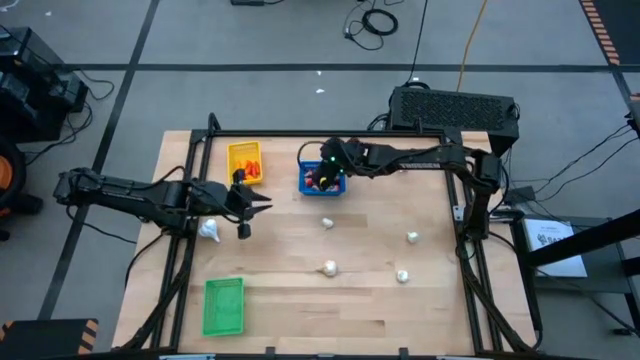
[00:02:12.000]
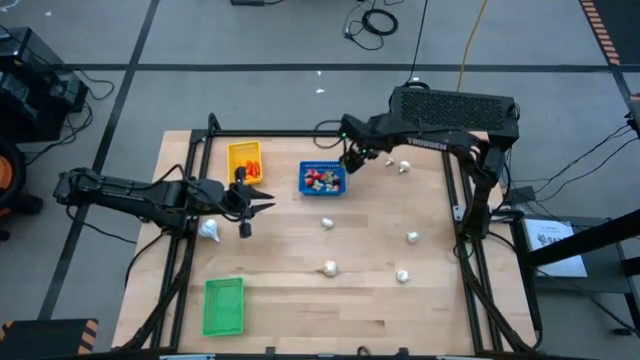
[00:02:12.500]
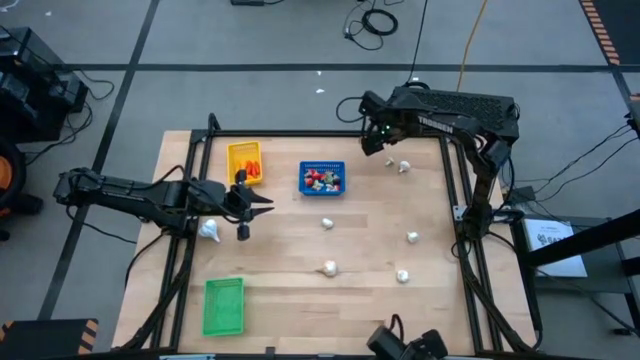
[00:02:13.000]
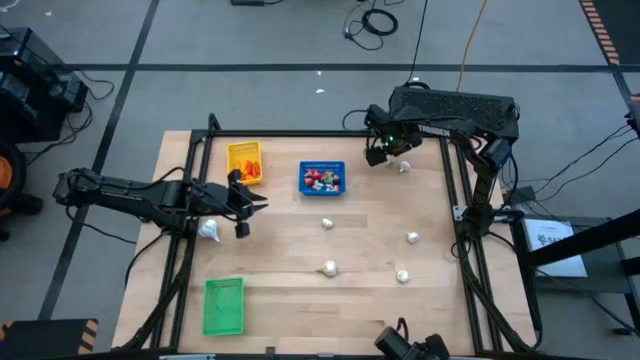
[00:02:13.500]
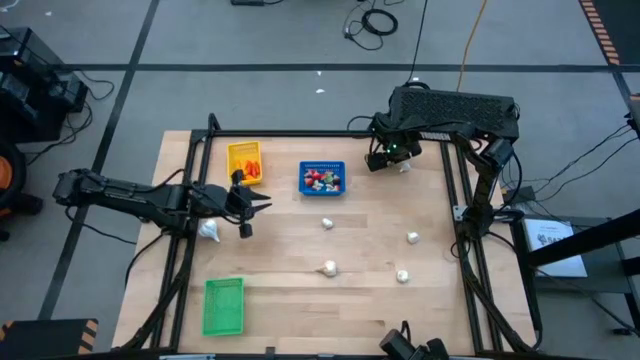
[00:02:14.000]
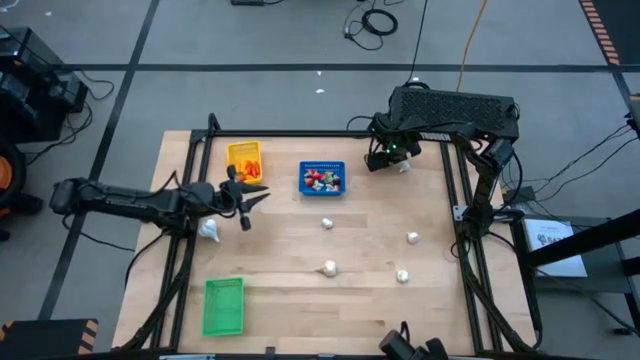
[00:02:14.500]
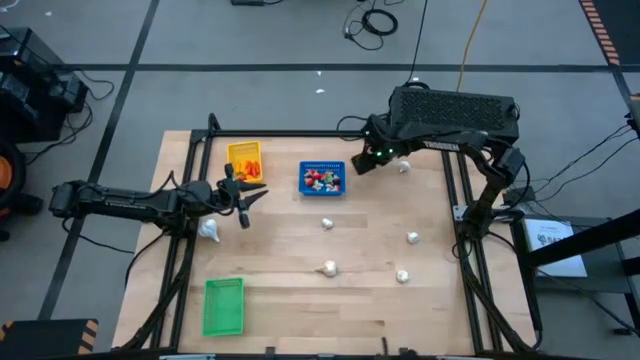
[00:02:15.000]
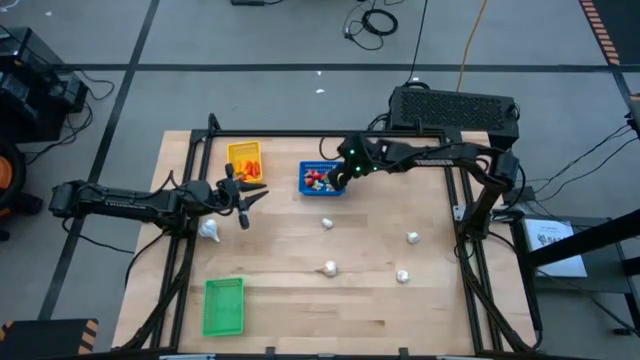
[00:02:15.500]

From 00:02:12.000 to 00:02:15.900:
Task: Sort produce into baskets
Put the green mushroom into the blue bin

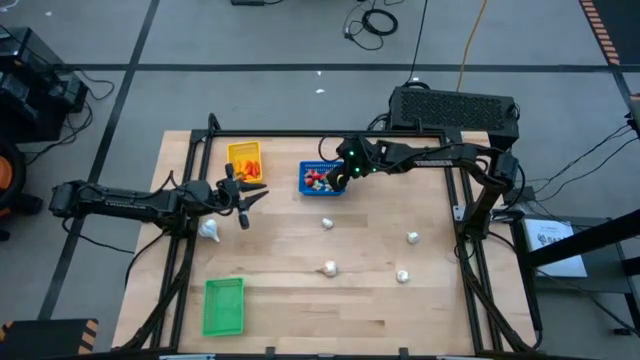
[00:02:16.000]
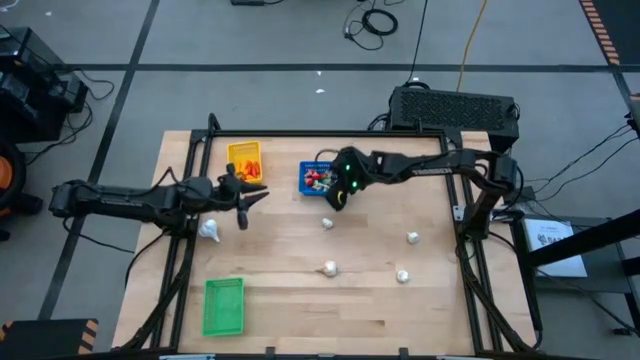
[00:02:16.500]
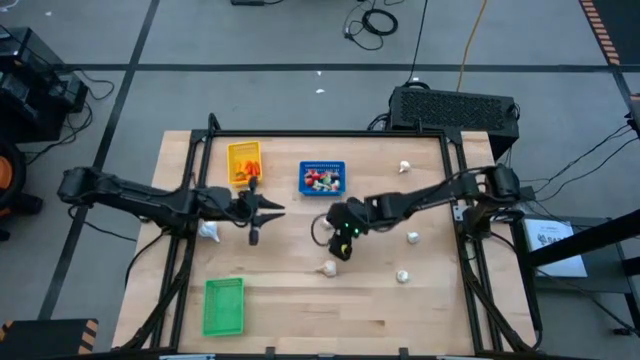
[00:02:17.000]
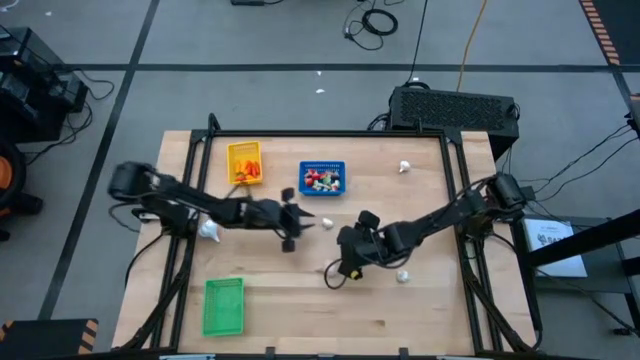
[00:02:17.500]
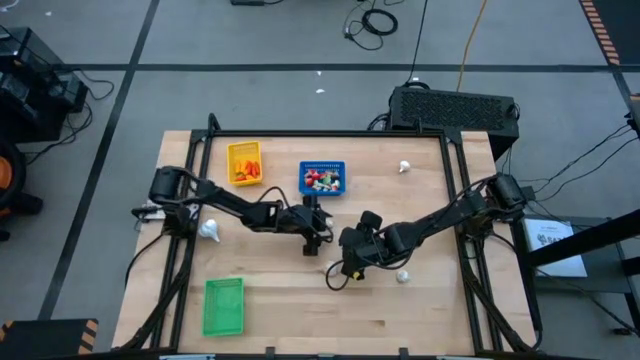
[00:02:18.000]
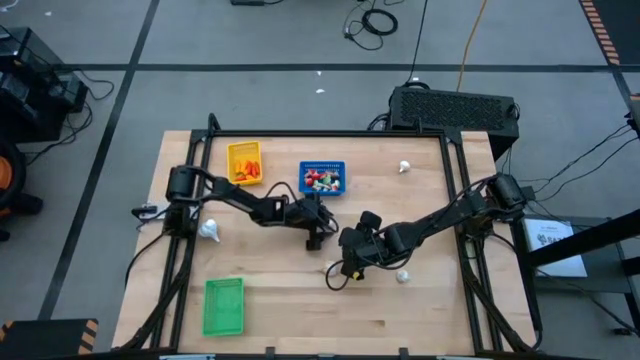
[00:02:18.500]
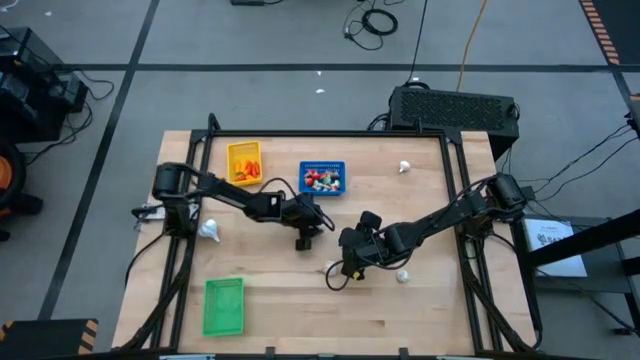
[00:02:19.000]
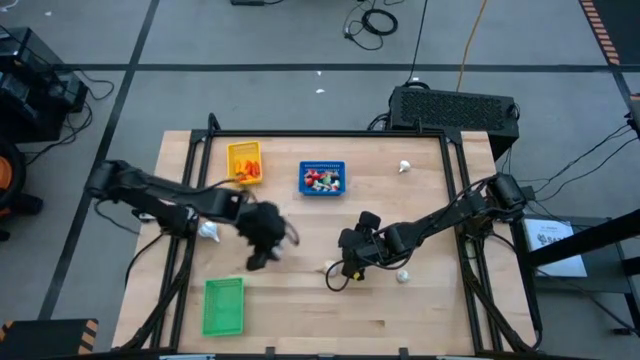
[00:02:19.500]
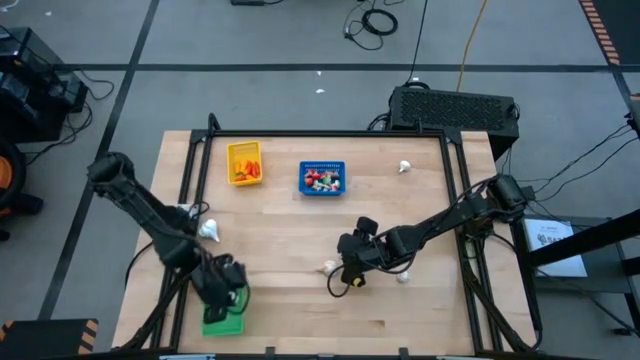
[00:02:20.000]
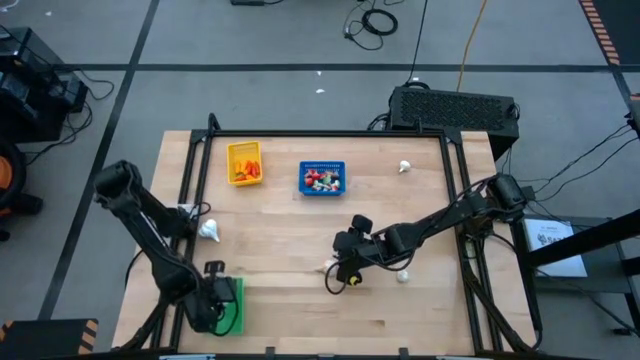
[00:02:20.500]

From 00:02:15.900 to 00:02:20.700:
Put the garlic into the green bin

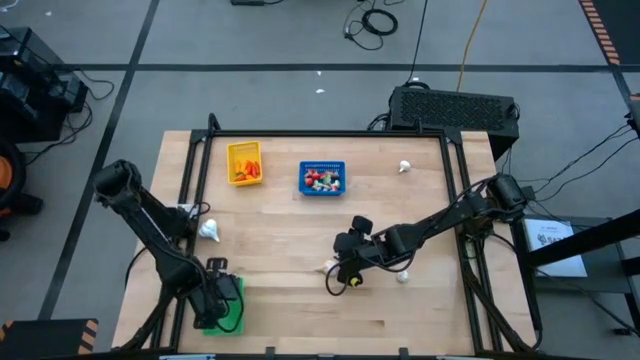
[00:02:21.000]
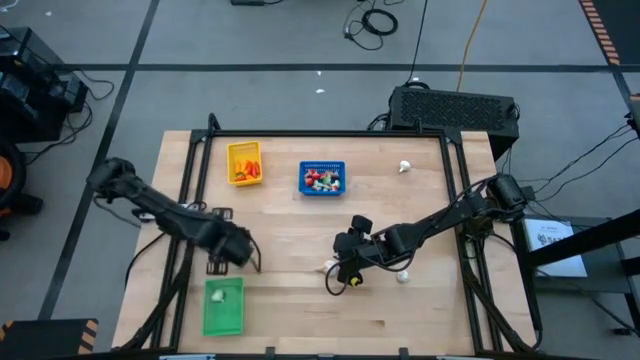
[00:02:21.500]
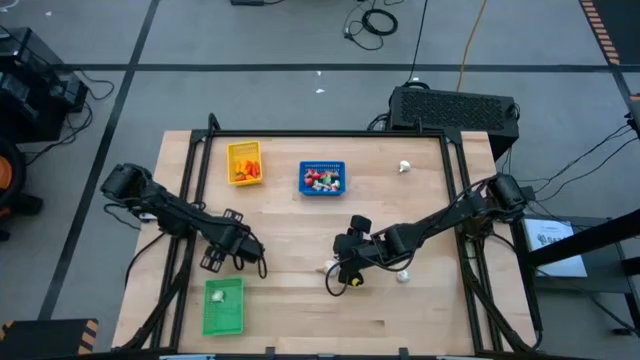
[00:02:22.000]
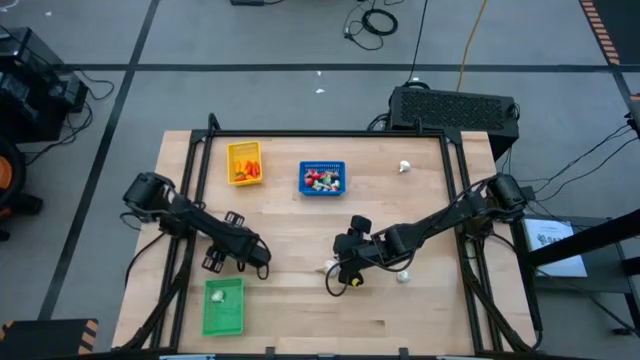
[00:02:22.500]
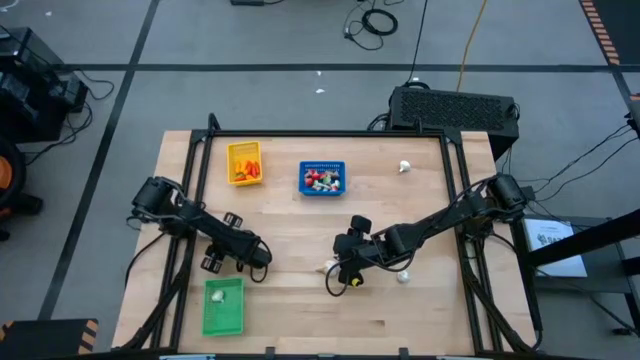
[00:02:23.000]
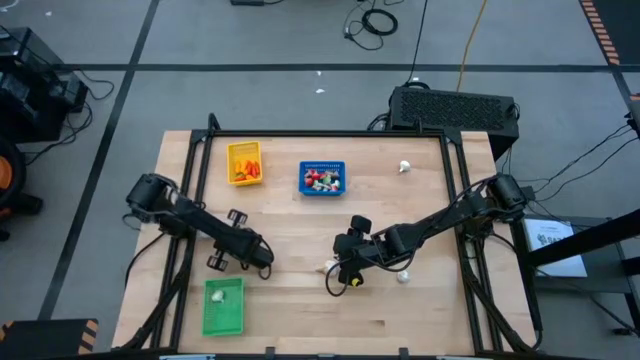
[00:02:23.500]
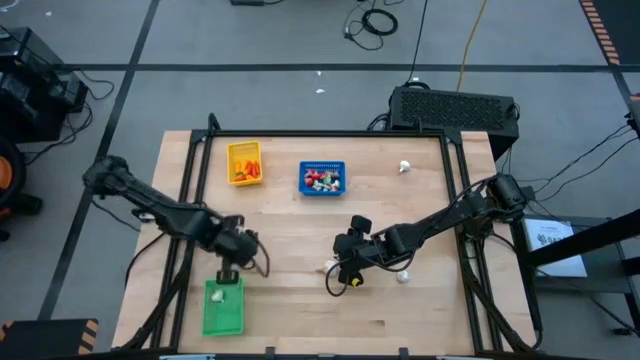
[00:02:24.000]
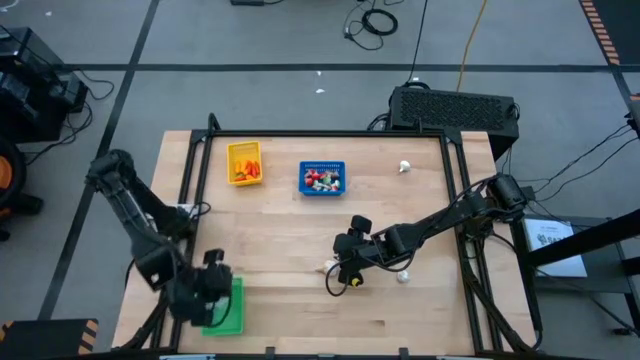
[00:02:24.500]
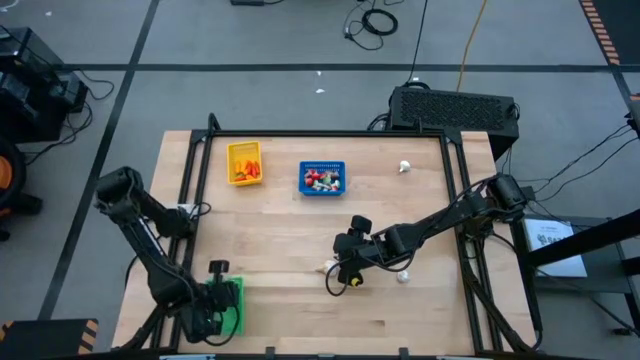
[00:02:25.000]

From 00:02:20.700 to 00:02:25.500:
Put the garlic into the green bin

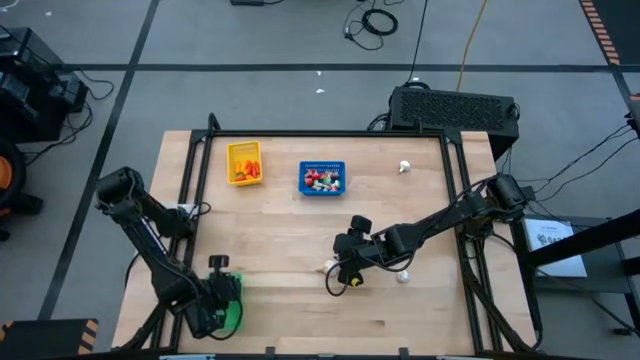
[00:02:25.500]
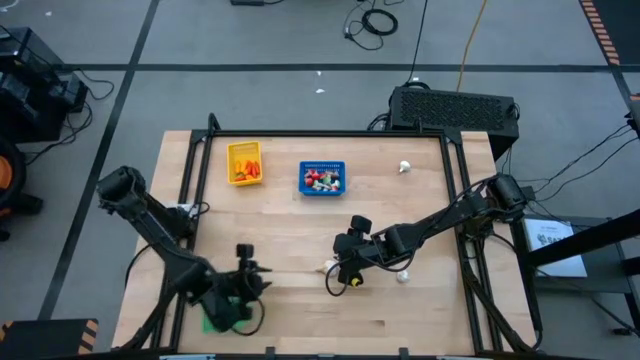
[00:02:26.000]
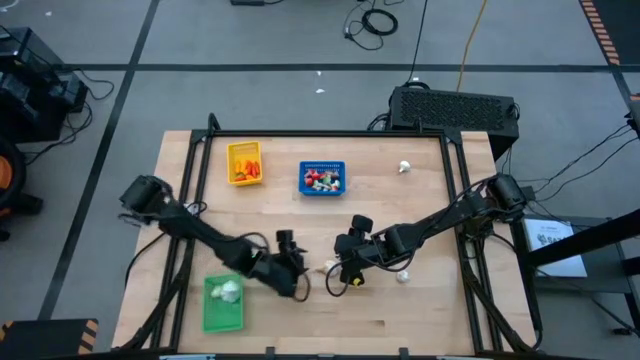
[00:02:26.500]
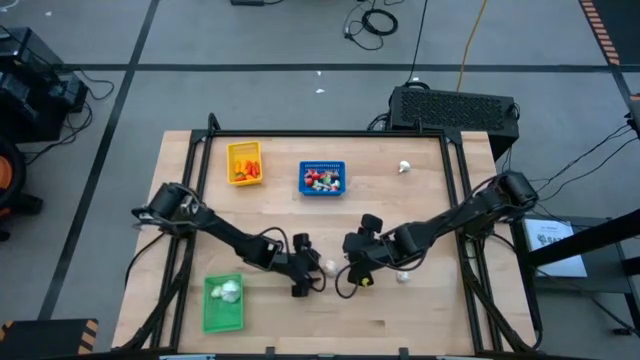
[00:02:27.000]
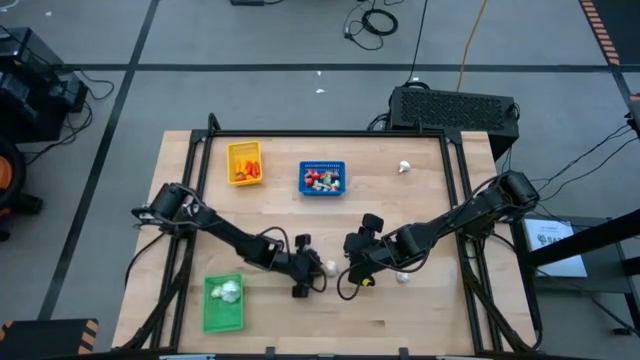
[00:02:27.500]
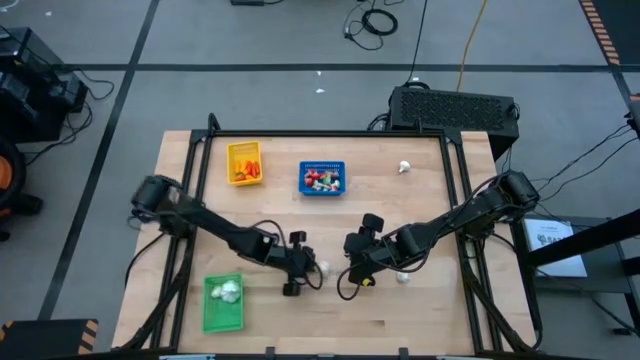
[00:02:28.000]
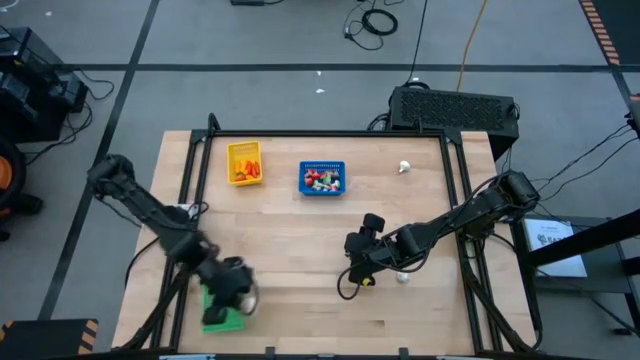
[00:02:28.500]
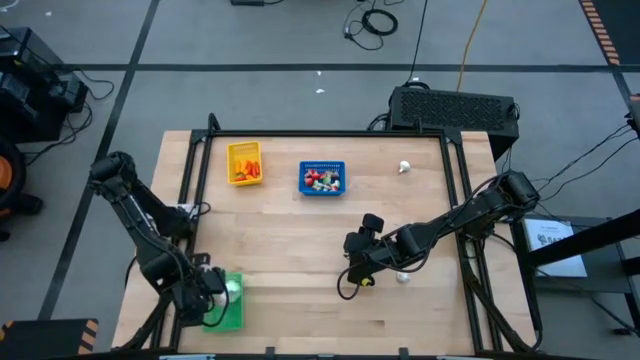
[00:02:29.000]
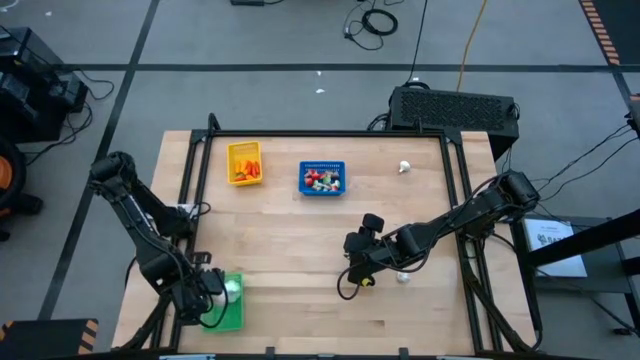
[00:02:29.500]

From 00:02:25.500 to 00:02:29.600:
Put the garlic into the green bin
